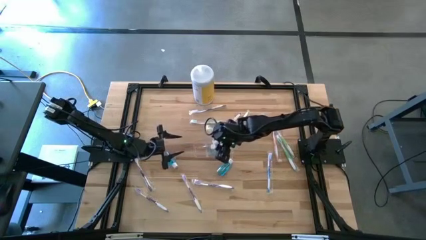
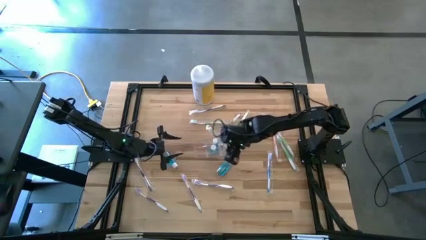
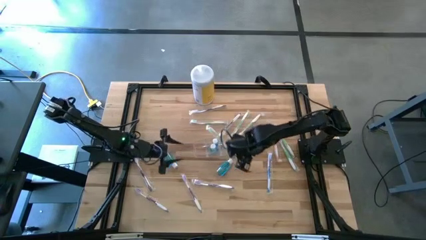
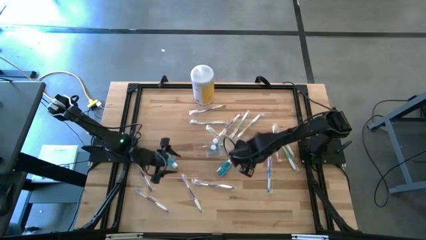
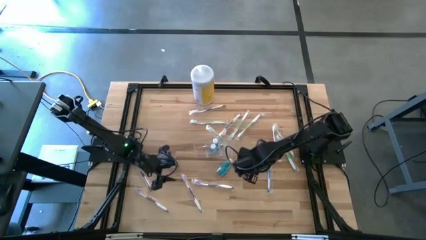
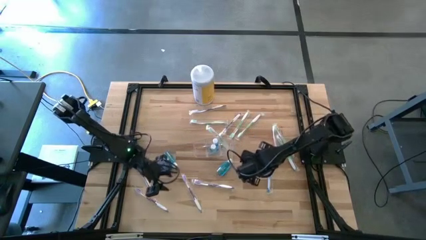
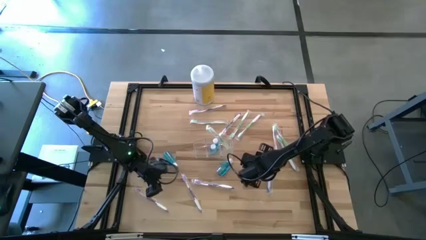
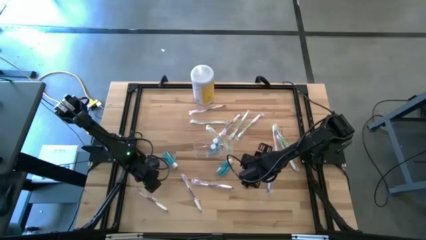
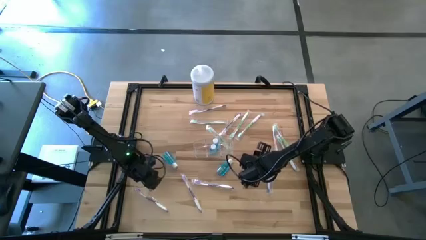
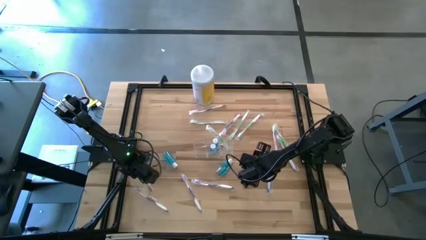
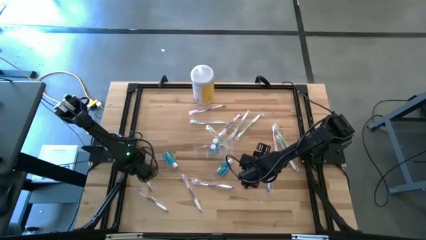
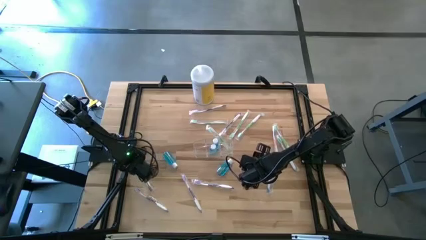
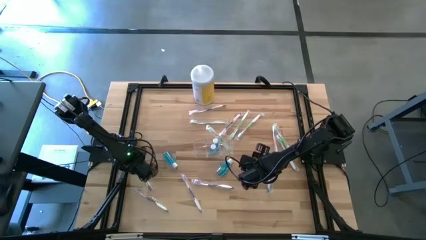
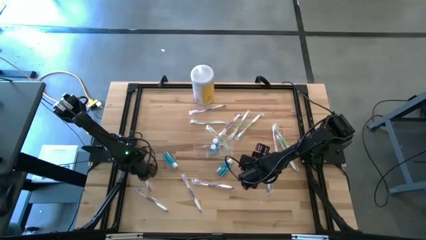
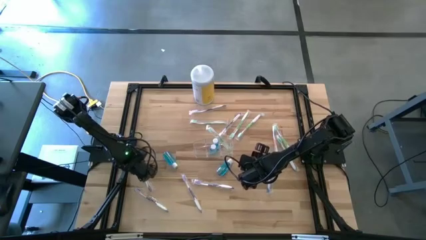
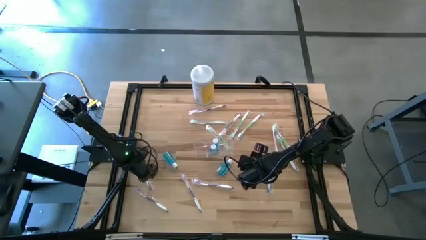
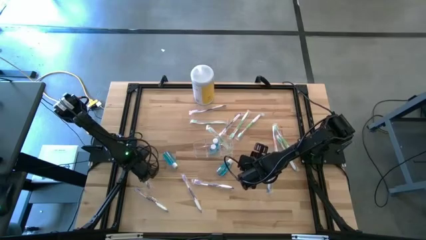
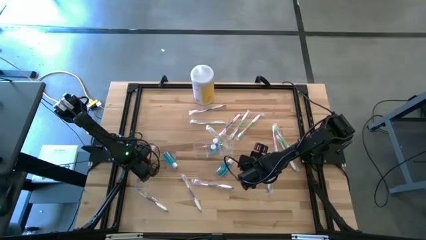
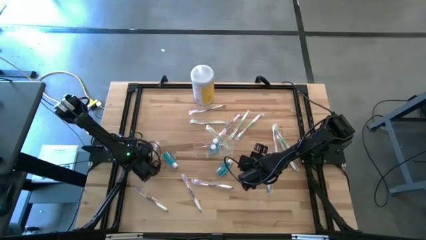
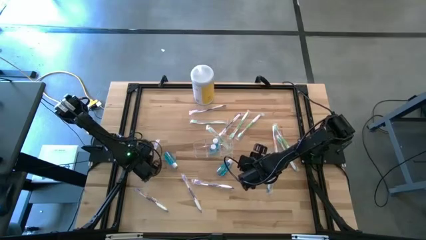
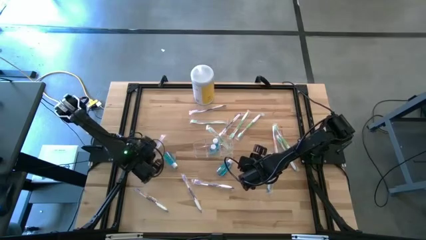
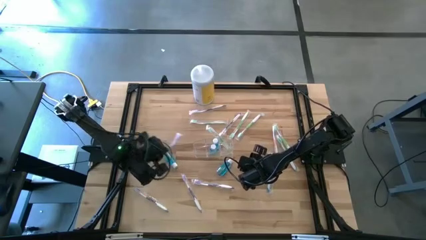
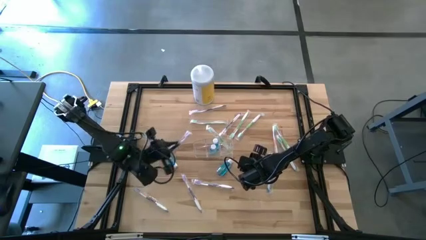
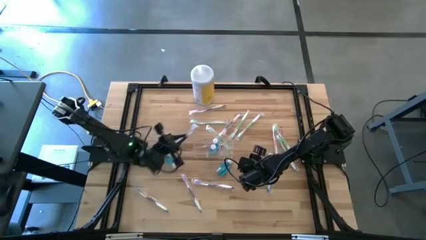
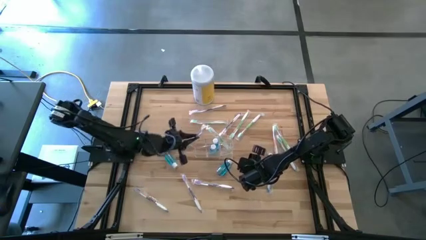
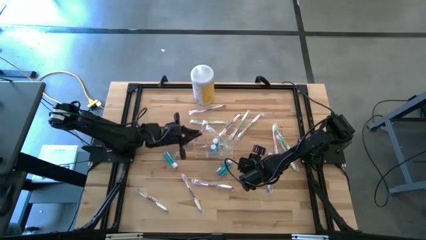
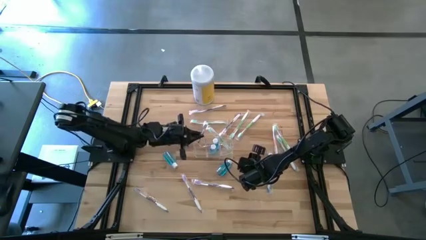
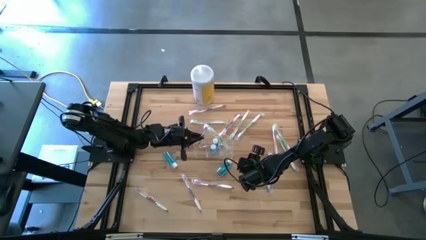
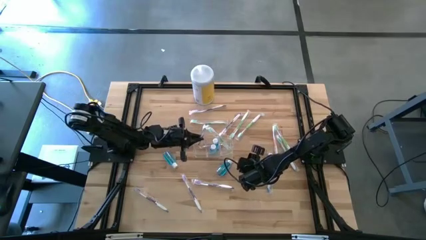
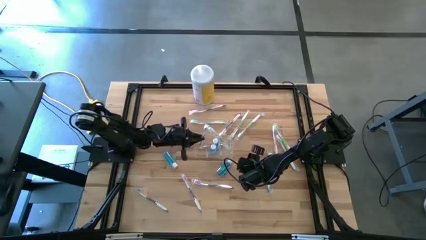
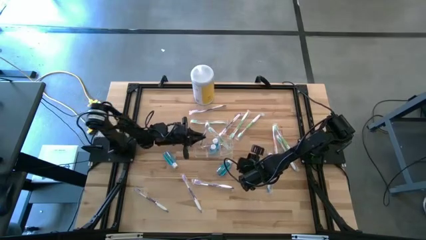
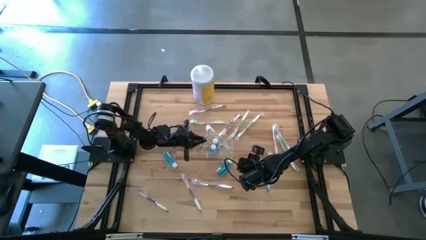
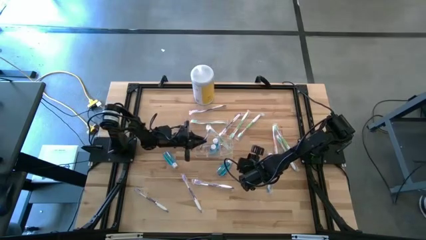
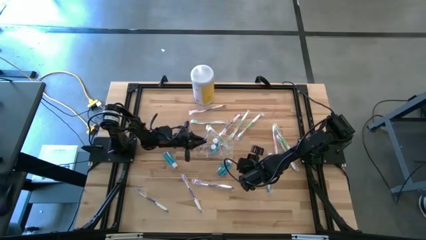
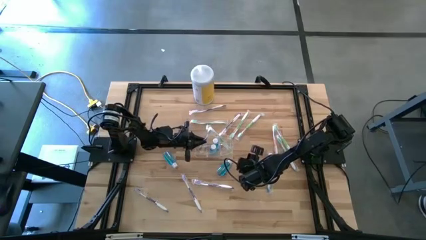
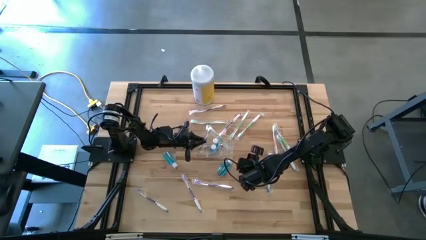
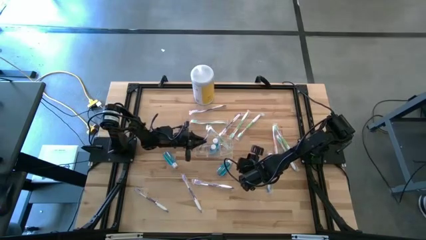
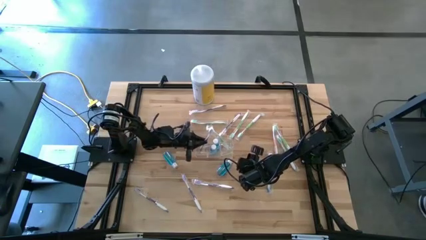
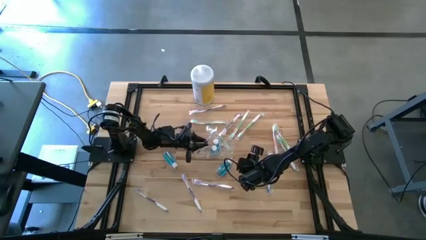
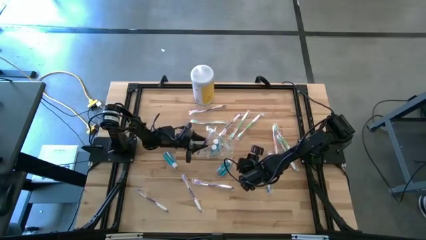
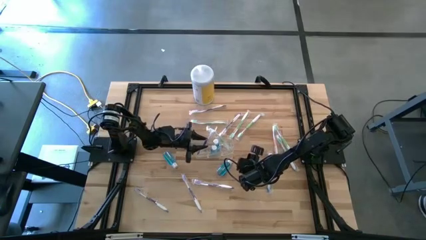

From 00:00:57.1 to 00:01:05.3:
Task: Pick & Place toothbrushing station
Put the violet toothbrush into the transparent organizer

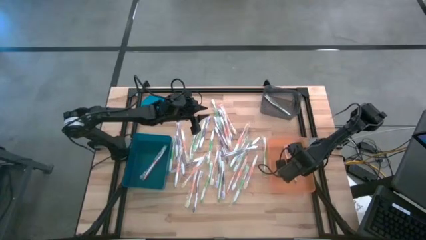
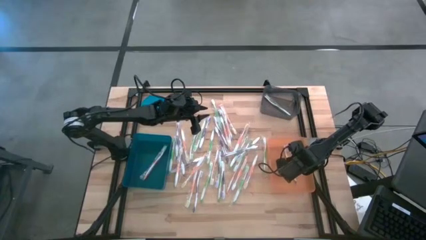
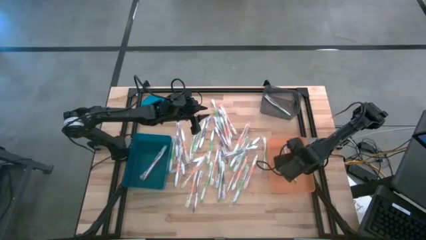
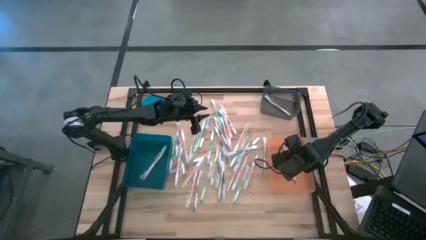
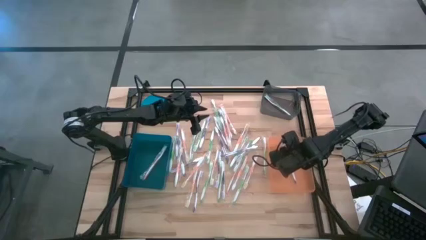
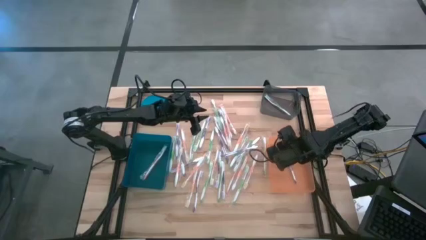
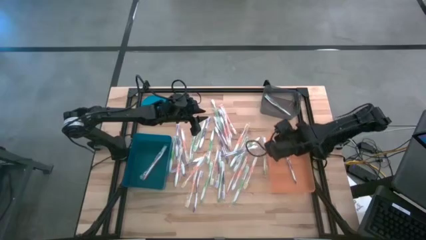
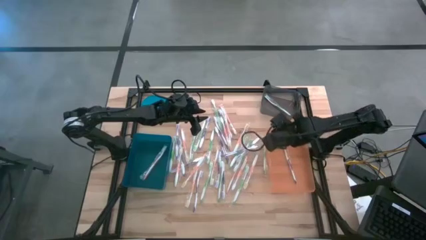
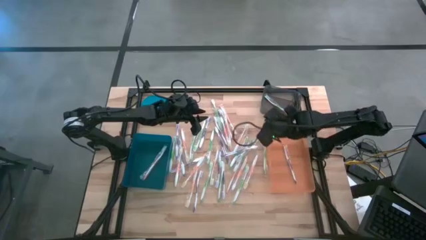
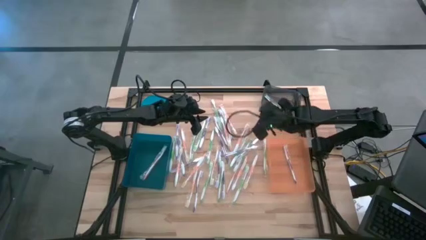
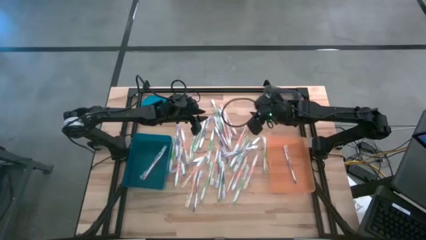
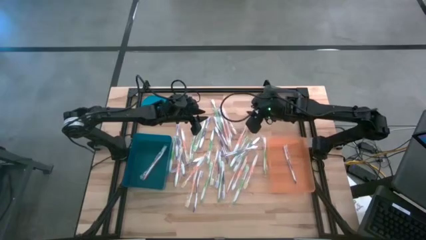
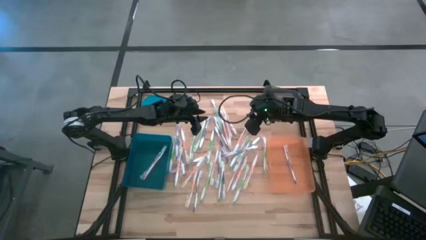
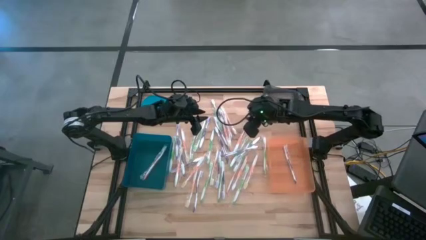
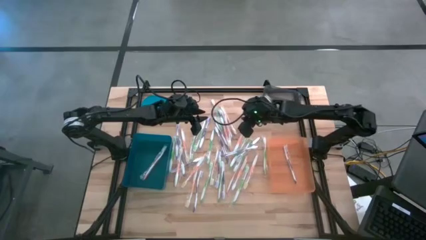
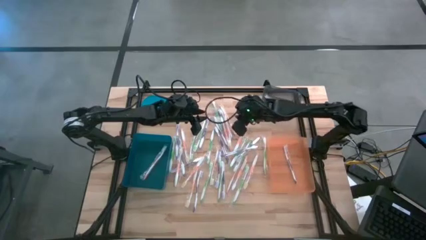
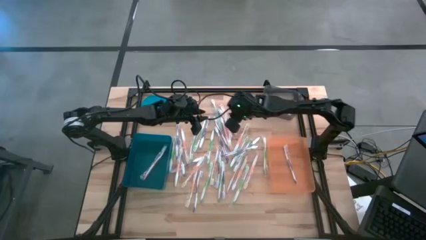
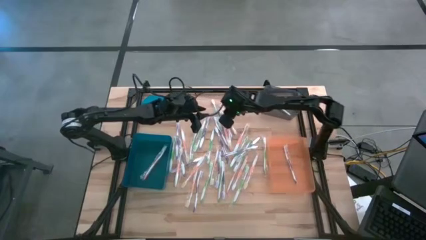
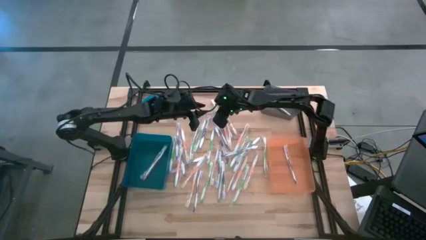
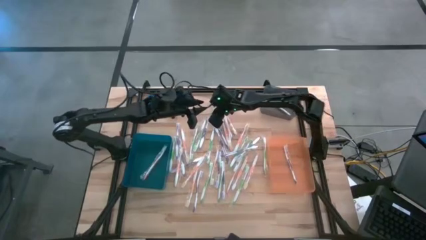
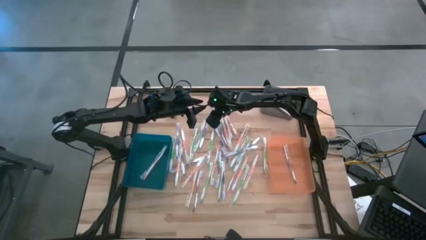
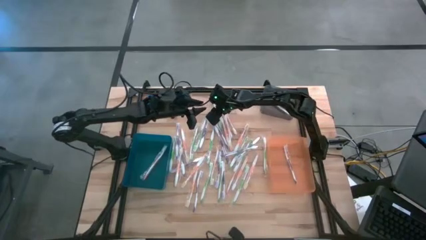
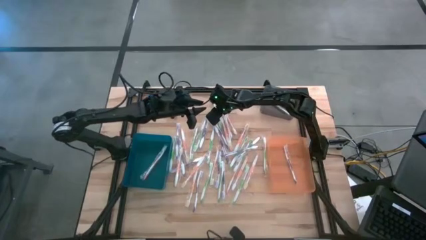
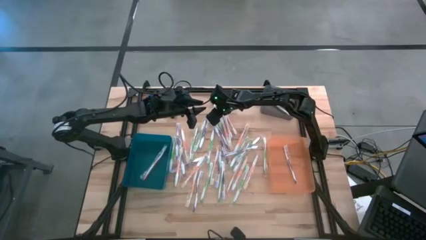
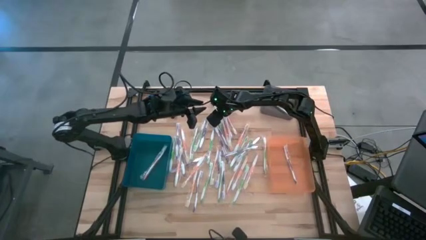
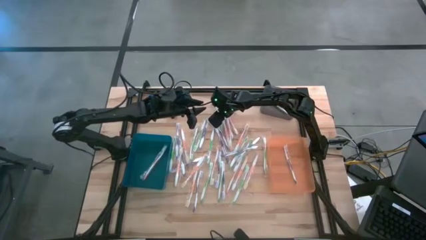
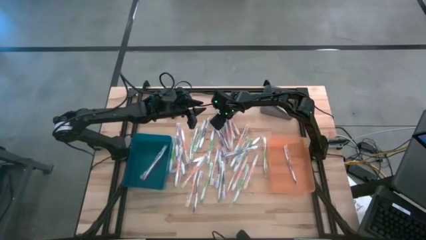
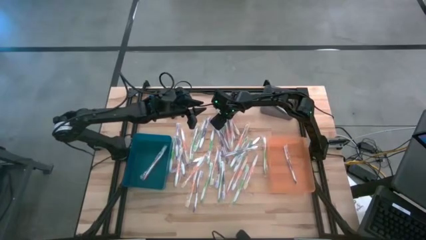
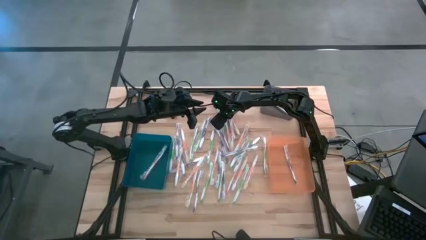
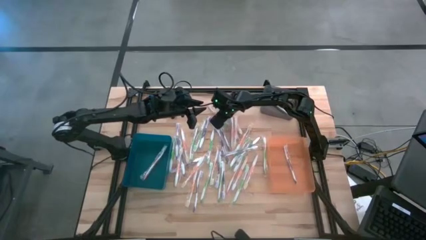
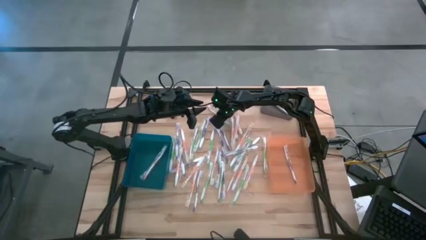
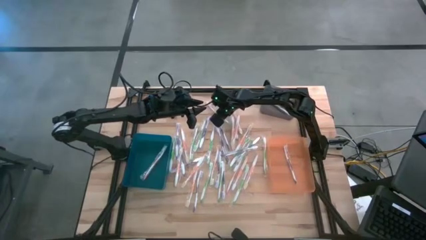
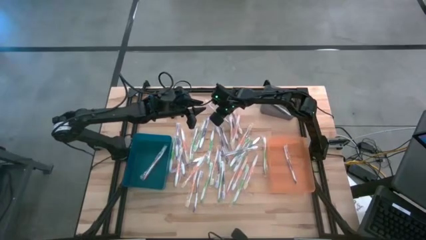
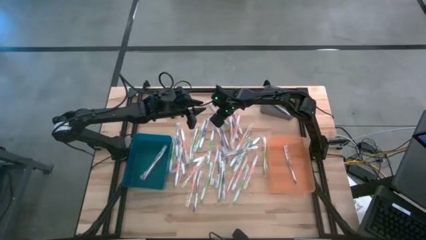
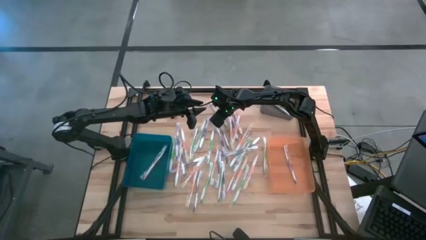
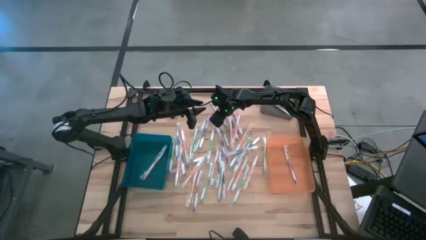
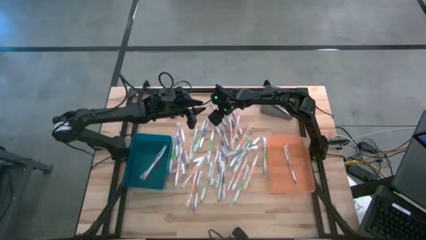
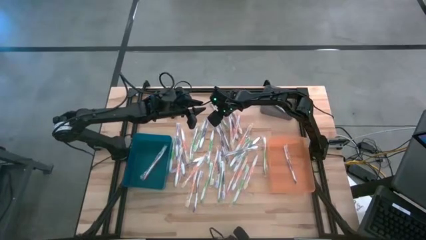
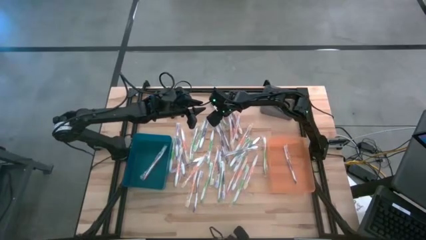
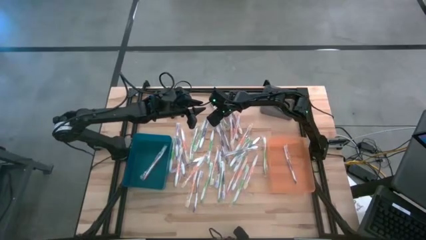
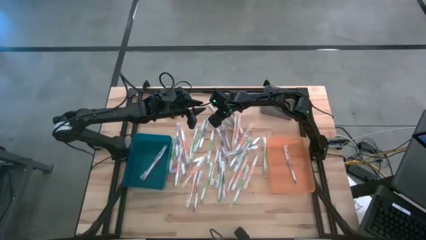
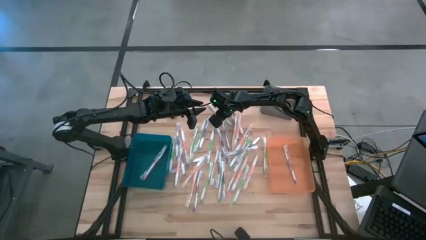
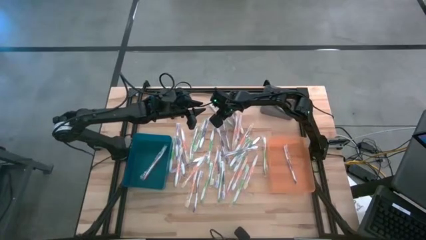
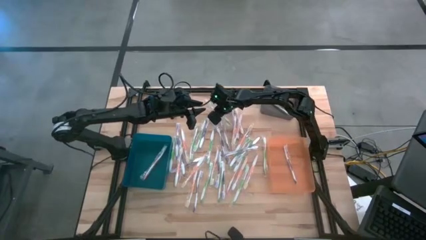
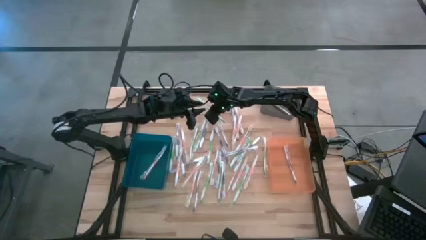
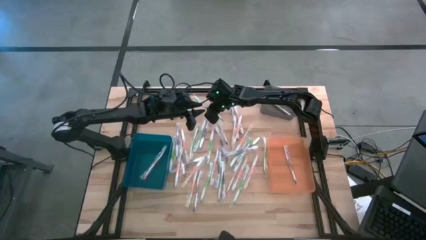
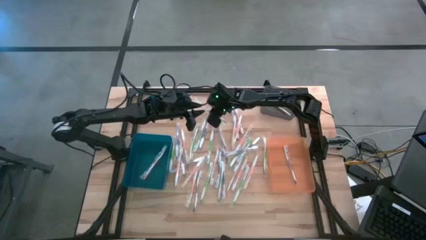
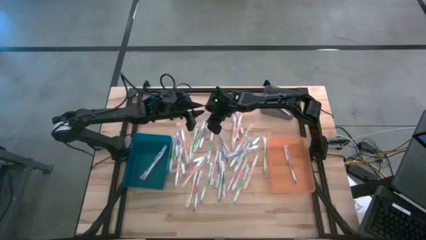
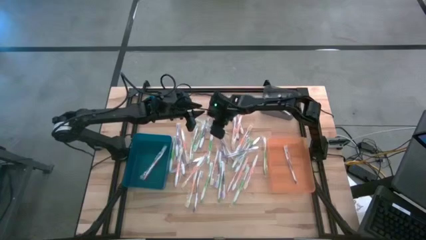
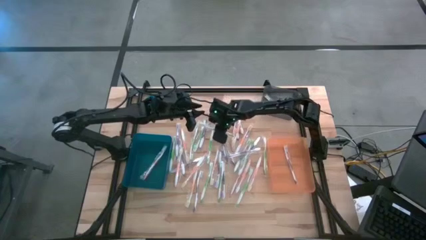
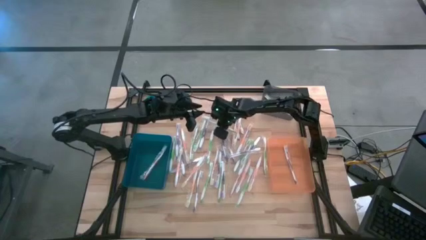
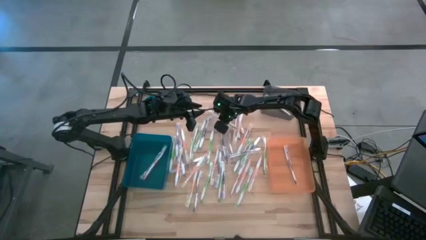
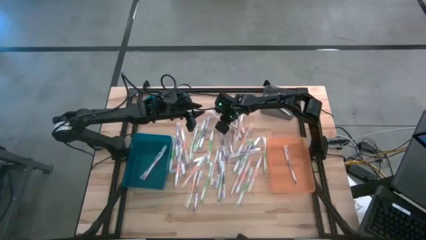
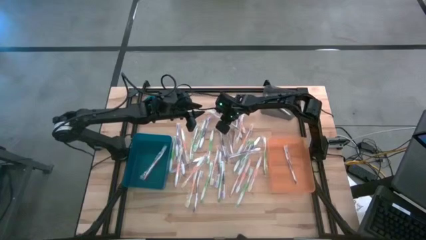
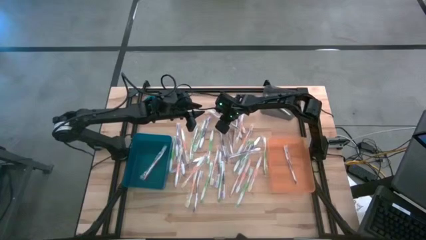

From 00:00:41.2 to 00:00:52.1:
Task: Pick & Place Toothbrushes
Put the green toothbrush into the black bin
